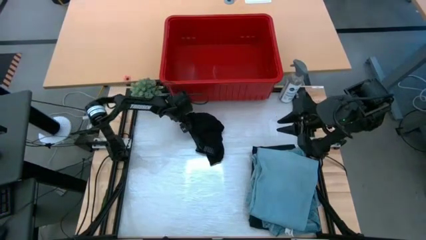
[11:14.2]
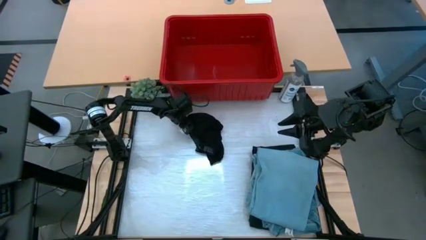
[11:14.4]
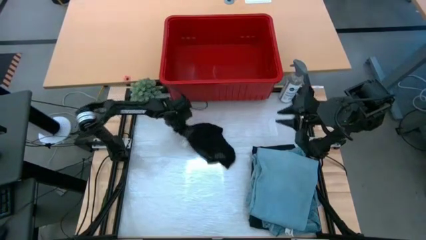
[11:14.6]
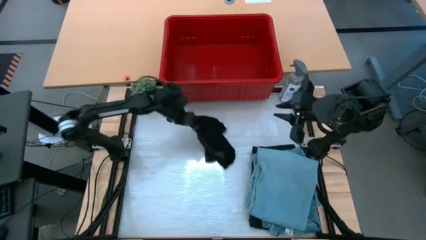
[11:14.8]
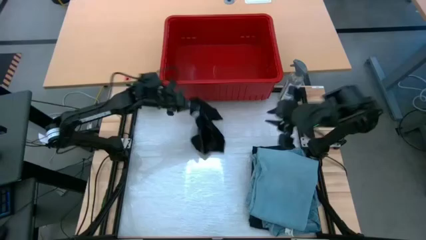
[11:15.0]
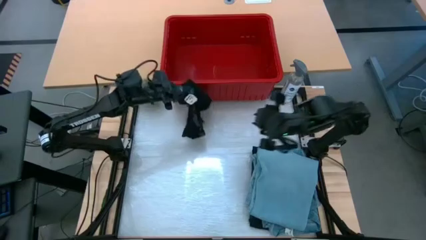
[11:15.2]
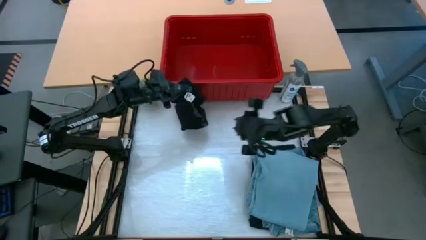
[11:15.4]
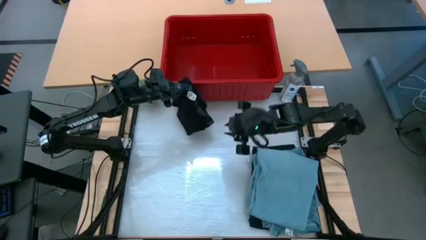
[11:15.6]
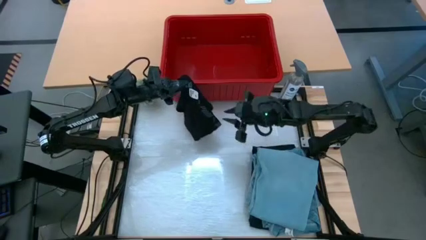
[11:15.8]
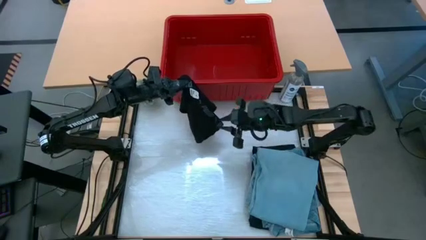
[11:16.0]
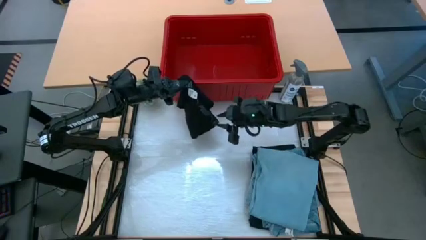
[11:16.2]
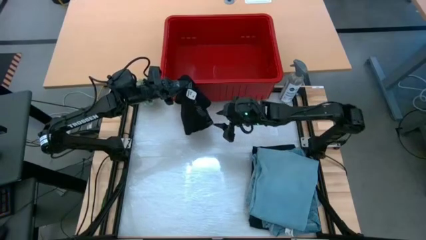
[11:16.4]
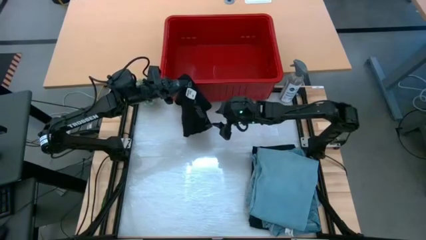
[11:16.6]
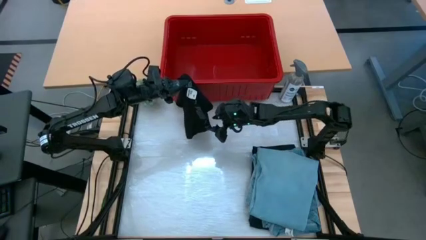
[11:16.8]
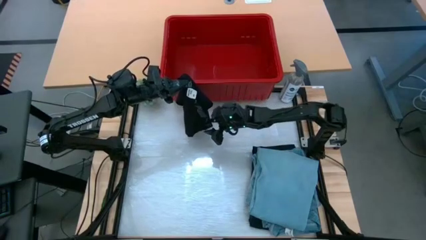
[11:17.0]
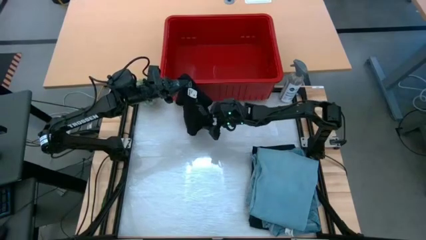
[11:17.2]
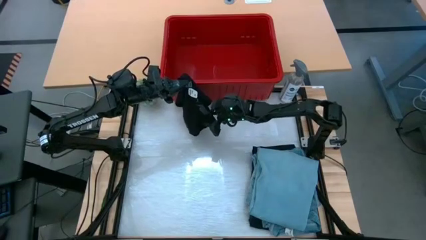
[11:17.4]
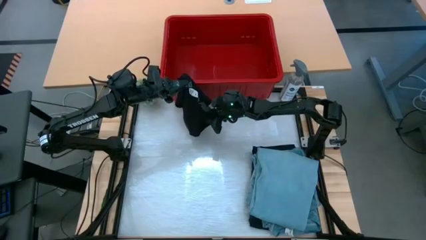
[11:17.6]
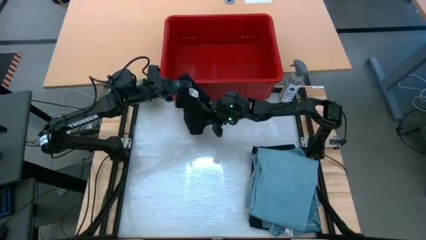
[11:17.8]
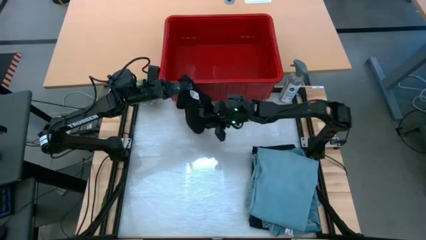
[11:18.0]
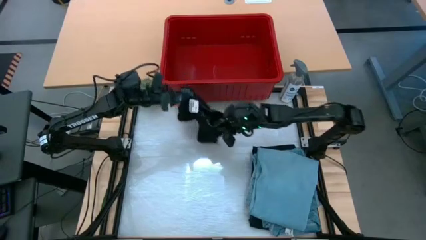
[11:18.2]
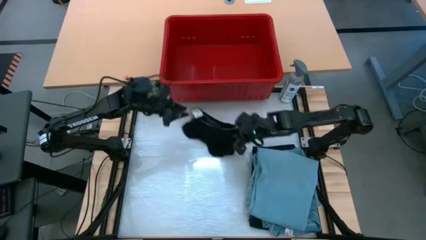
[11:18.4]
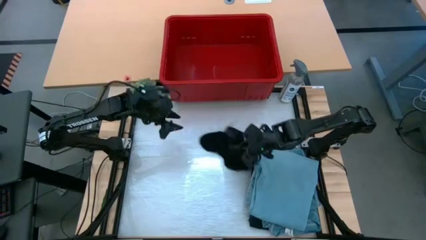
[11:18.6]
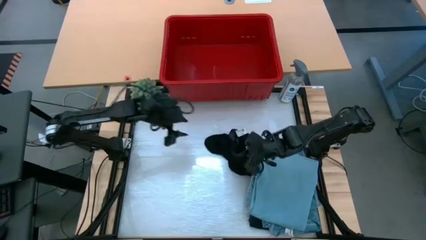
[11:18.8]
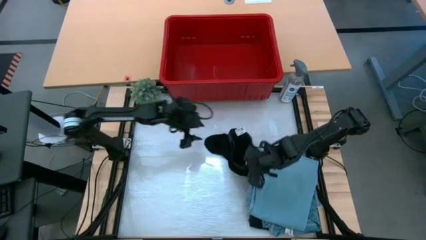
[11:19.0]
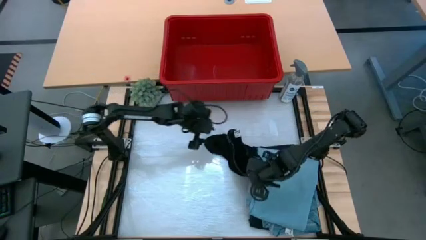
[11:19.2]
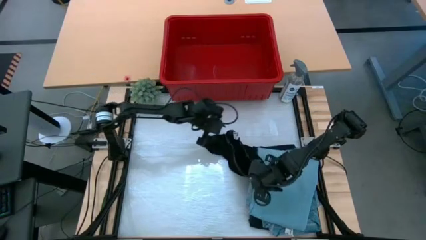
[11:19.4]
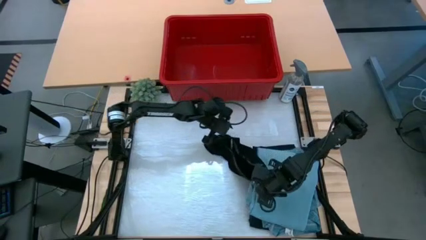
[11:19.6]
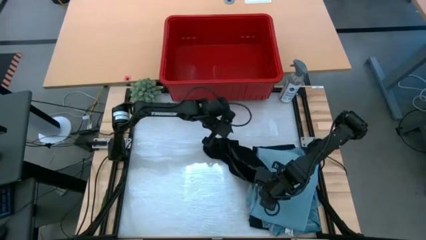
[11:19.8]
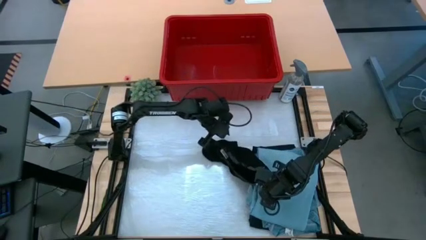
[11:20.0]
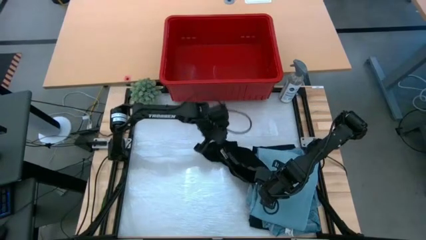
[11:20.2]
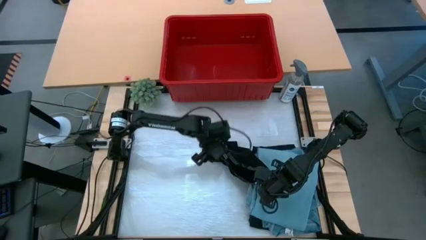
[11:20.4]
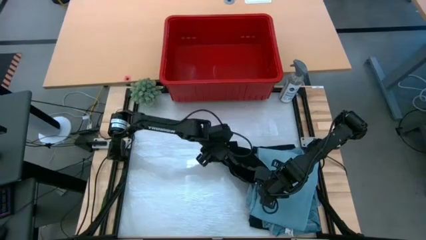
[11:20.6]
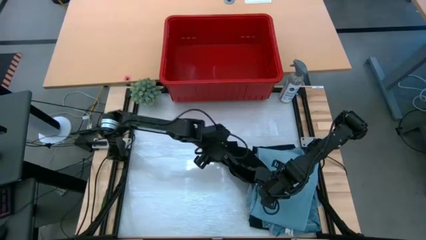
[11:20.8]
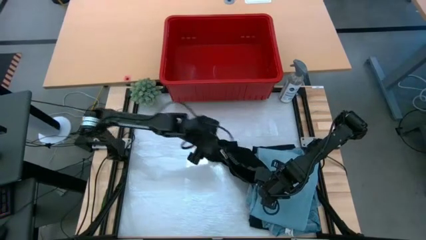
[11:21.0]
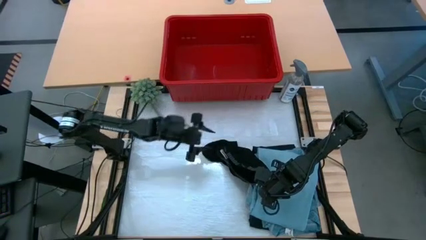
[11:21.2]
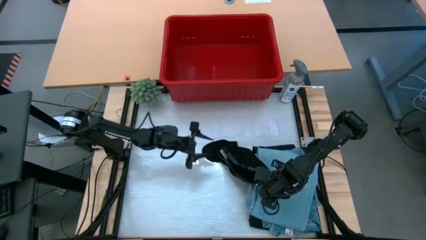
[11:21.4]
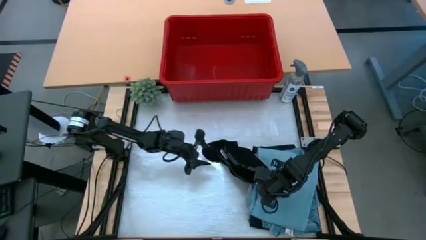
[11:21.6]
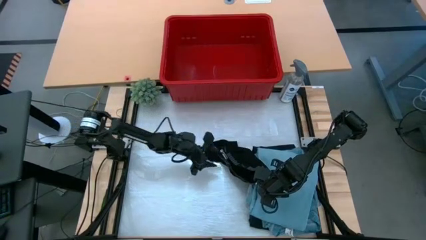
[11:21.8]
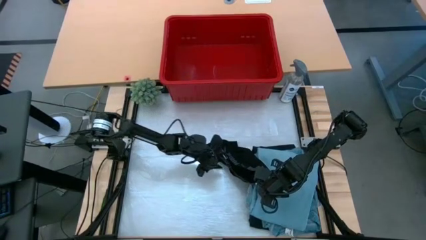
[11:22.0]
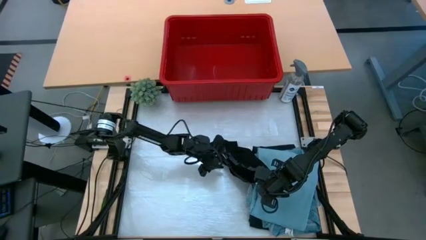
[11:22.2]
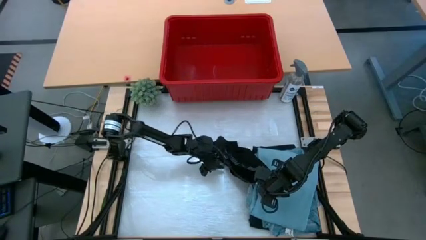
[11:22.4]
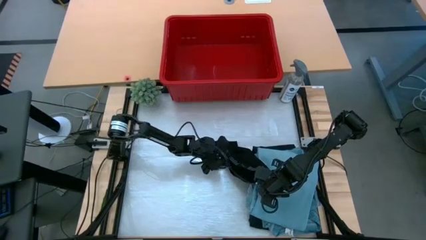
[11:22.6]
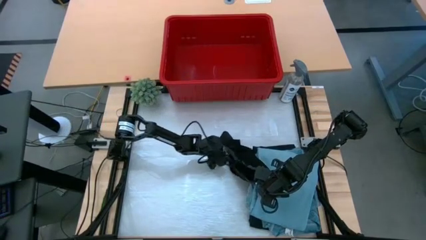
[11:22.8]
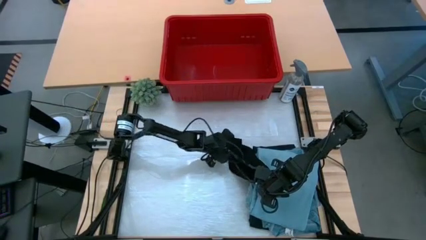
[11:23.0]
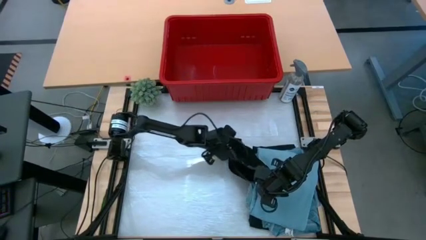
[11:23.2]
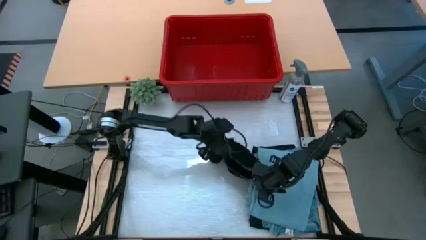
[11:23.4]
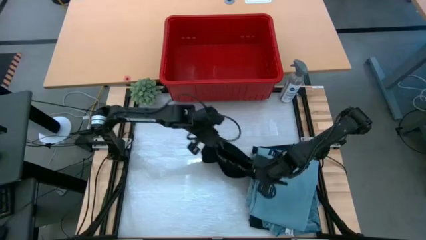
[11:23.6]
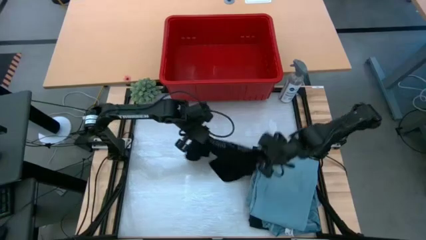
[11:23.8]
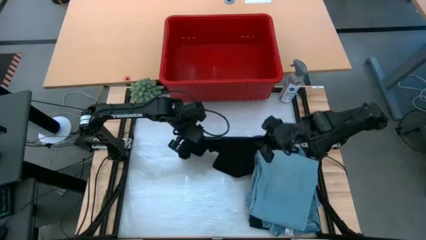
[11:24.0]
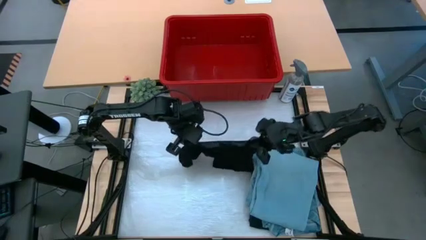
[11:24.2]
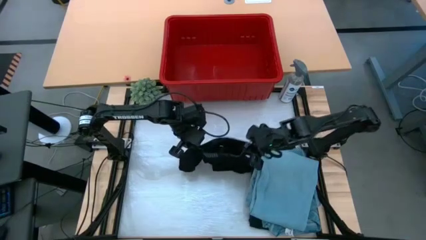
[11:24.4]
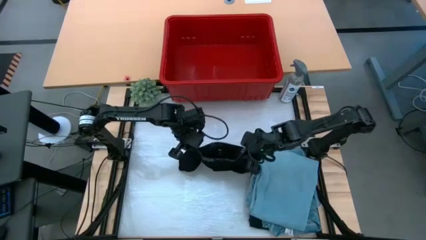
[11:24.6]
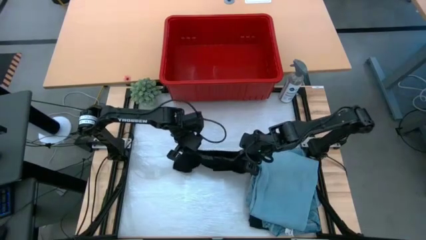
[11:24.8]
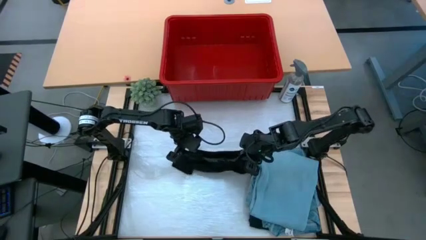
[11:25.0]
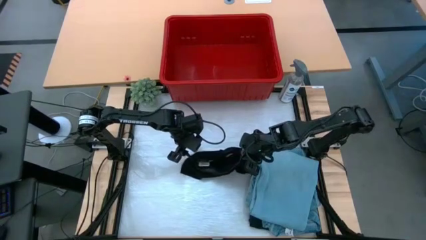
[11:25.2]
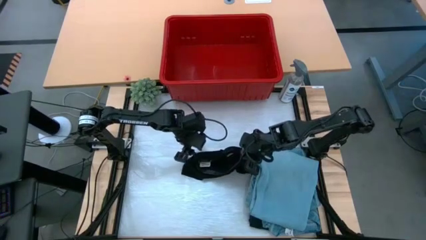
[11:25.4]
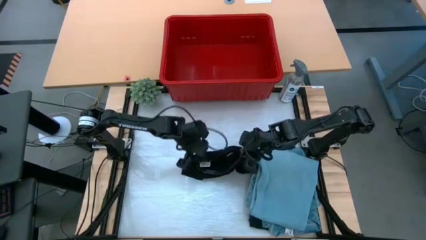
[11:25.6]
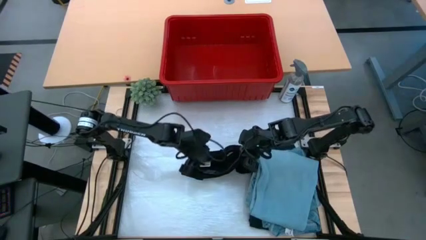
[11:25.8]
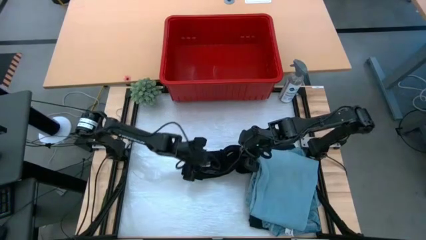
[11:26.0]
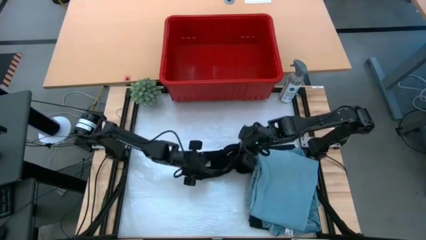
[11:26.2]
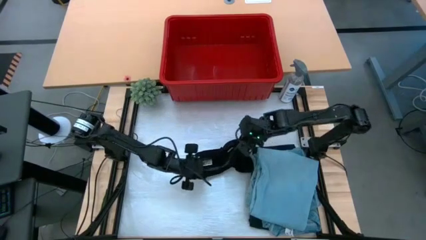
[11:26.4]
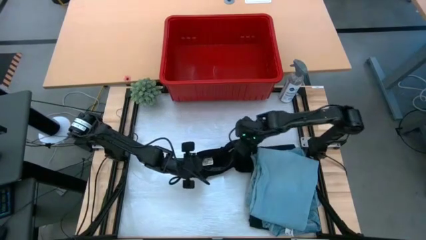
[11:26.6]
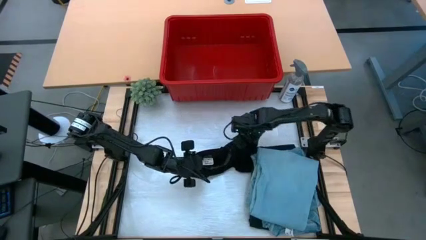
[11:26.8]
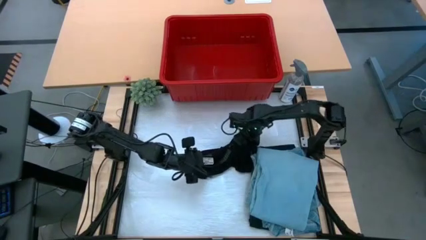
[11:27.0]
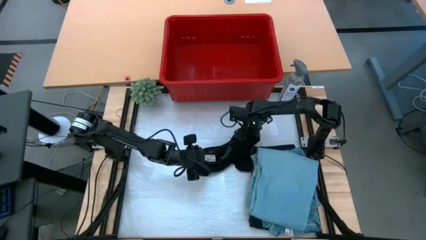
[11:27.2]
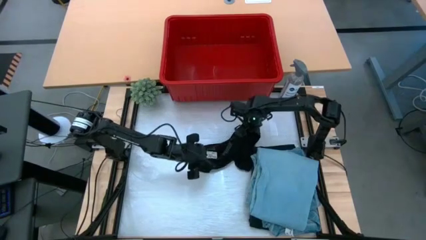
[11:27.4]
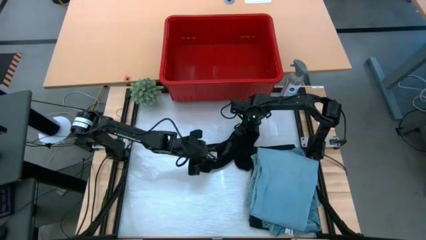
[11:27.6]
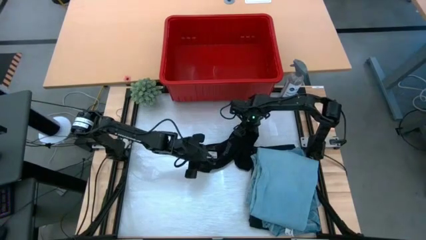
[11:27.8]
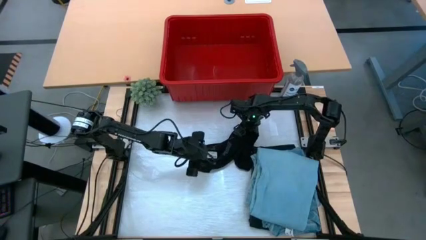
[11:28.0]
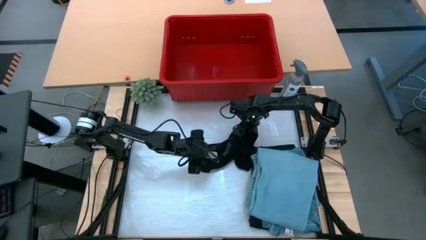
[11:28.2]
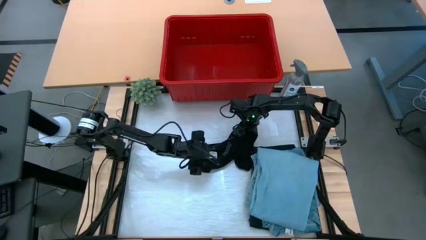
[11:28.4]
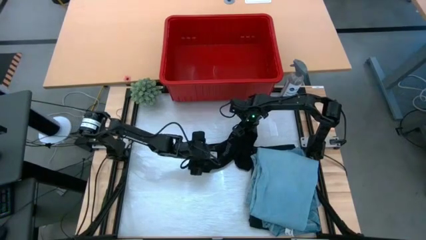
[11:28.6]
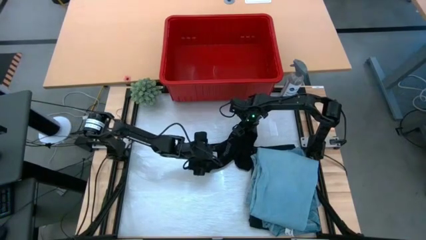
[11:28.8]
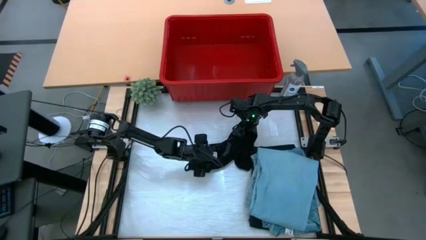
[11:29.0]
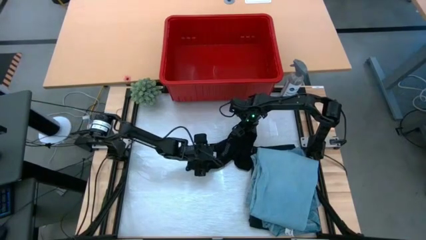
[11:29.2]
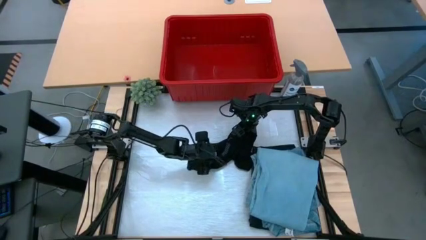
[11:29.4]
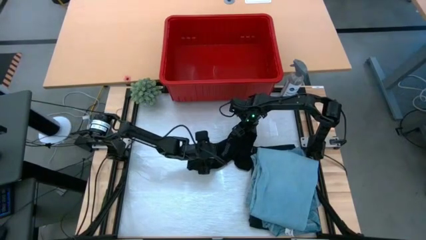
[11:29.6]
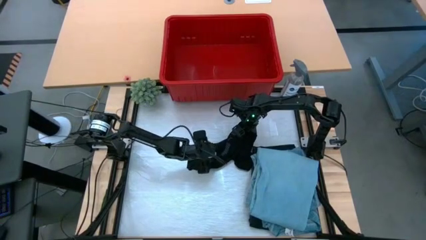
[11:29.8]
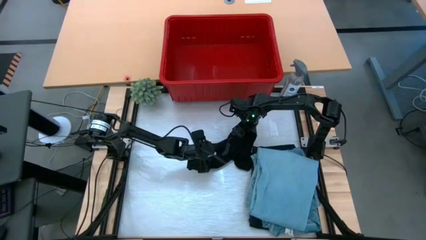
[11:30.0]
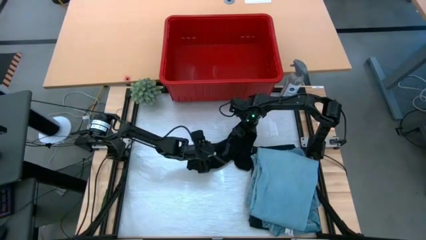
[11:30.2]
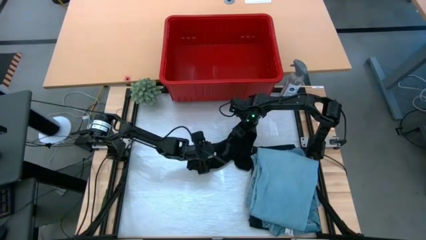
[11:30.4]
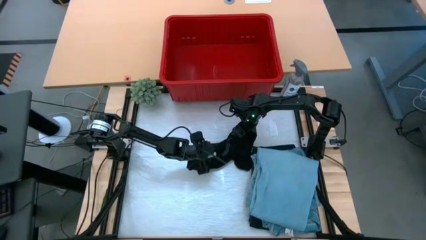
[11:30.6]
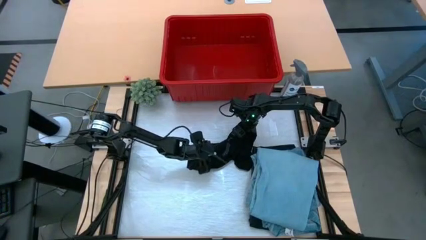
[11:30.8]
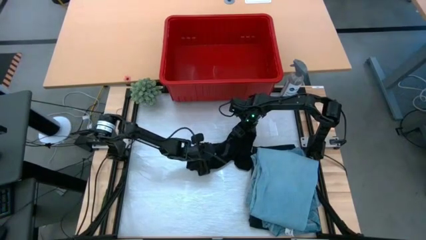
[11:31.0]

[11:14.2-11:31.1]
Task: Fold Laundry from Bin
Fold the black boxer
